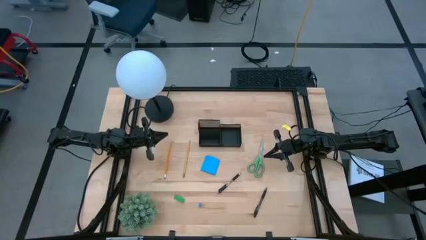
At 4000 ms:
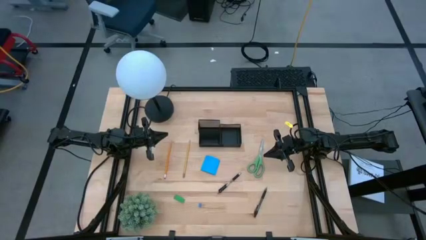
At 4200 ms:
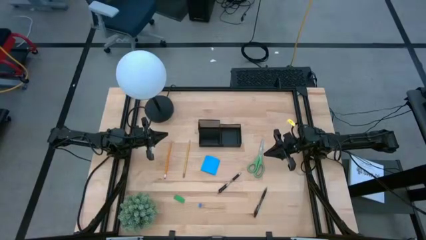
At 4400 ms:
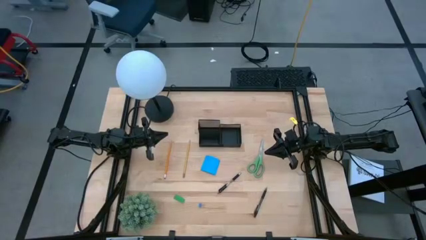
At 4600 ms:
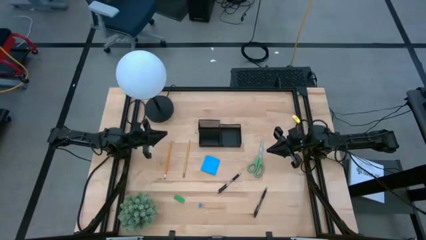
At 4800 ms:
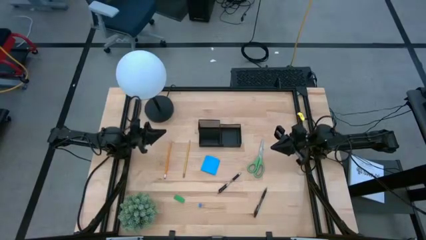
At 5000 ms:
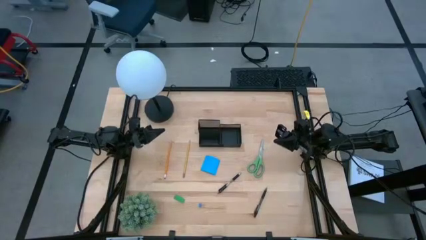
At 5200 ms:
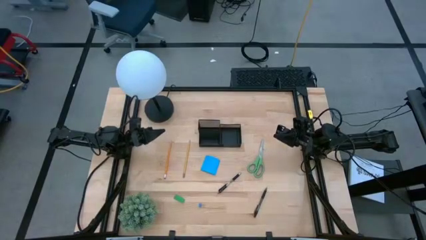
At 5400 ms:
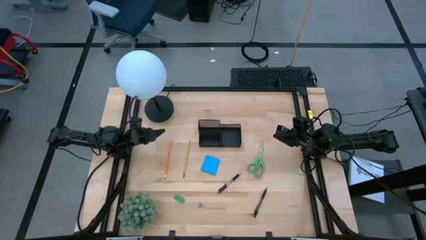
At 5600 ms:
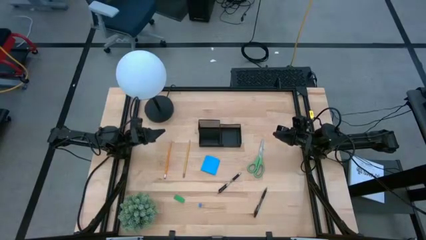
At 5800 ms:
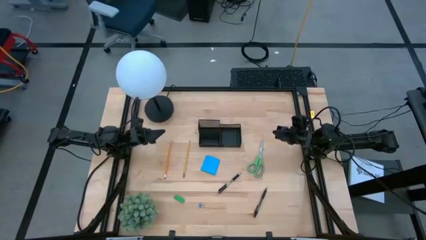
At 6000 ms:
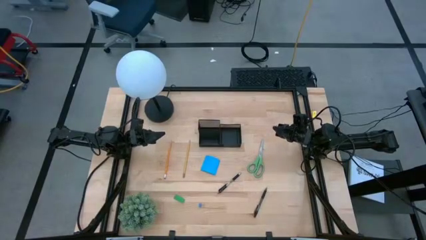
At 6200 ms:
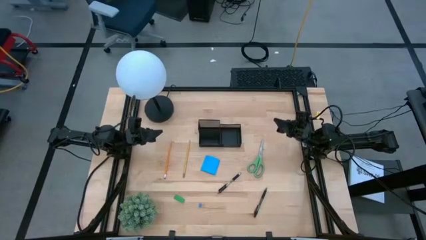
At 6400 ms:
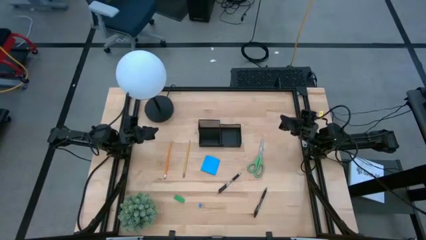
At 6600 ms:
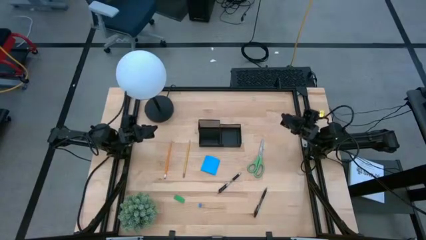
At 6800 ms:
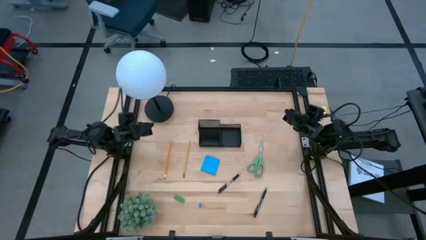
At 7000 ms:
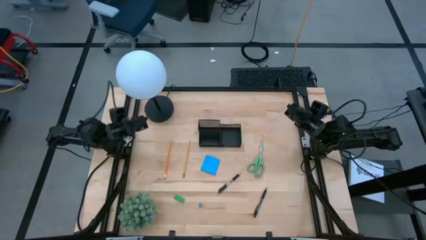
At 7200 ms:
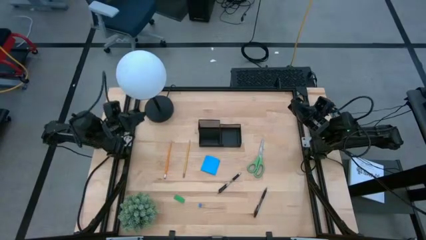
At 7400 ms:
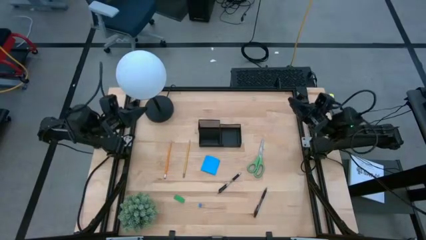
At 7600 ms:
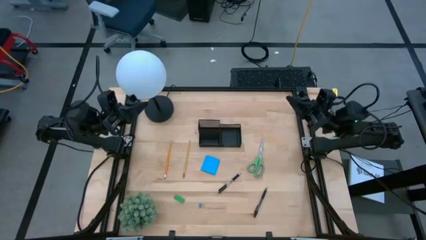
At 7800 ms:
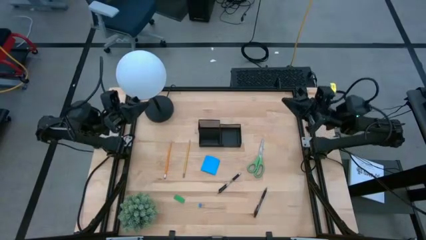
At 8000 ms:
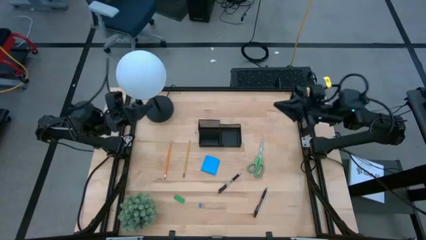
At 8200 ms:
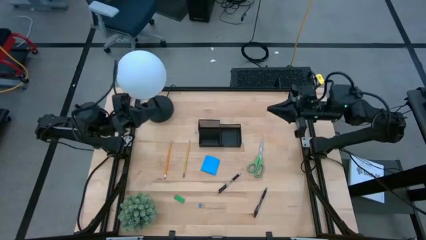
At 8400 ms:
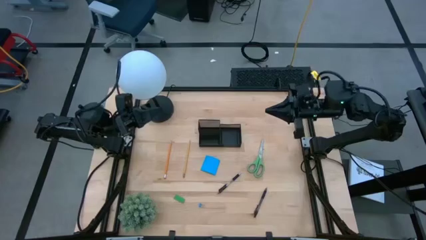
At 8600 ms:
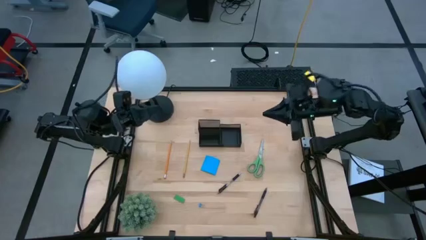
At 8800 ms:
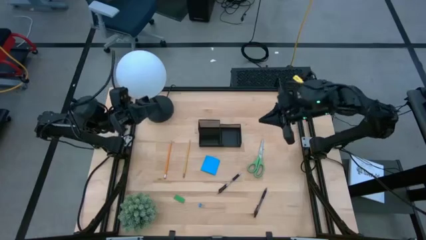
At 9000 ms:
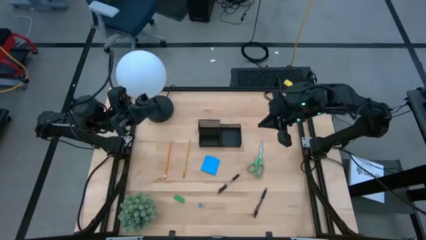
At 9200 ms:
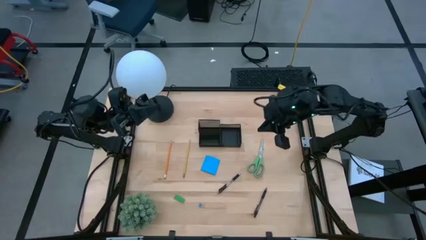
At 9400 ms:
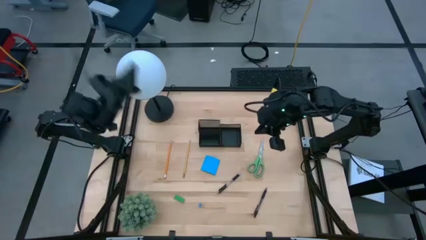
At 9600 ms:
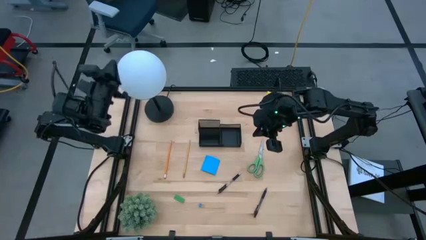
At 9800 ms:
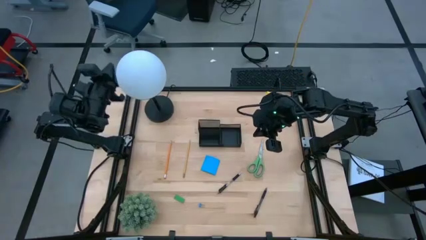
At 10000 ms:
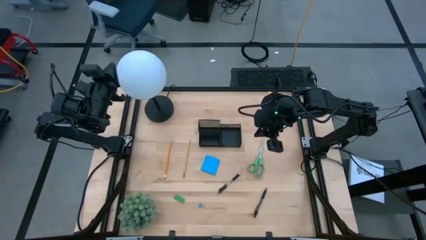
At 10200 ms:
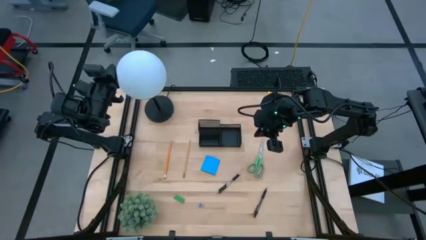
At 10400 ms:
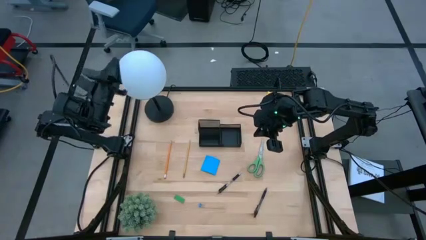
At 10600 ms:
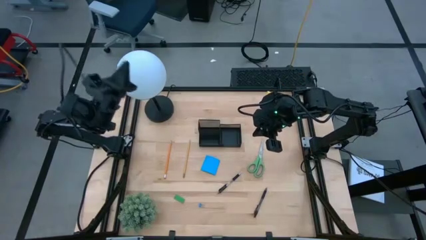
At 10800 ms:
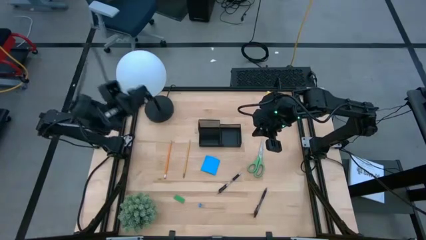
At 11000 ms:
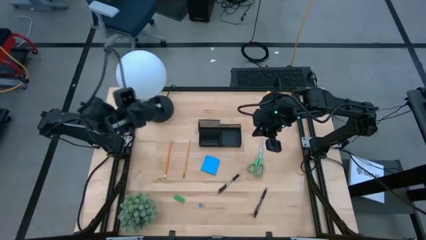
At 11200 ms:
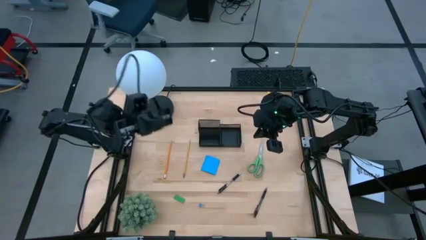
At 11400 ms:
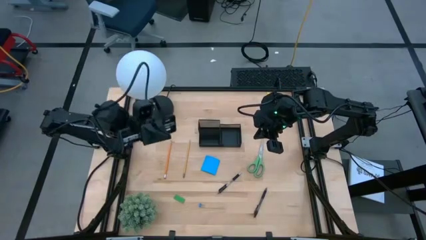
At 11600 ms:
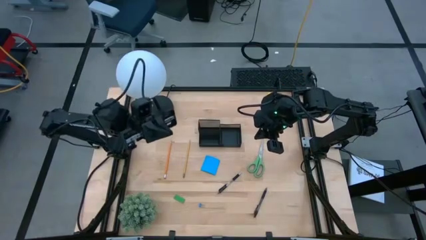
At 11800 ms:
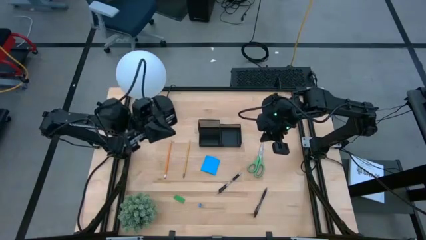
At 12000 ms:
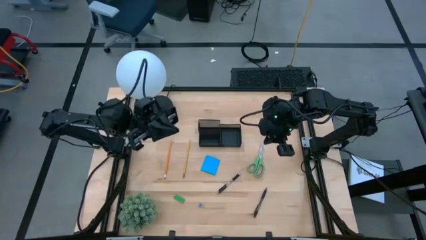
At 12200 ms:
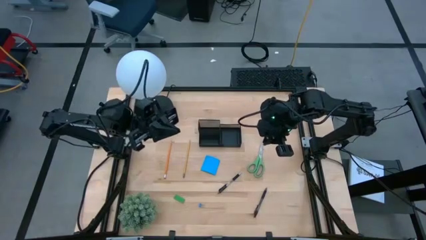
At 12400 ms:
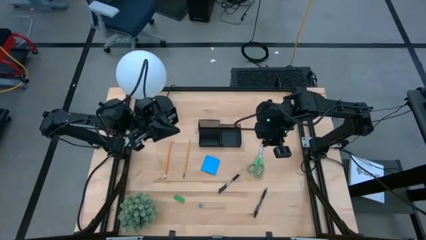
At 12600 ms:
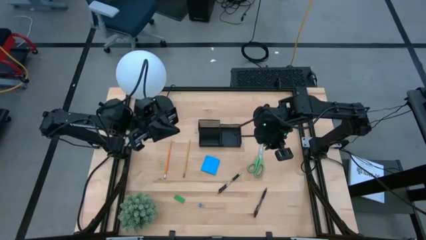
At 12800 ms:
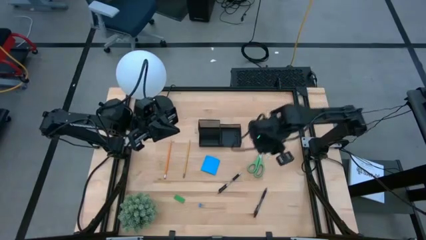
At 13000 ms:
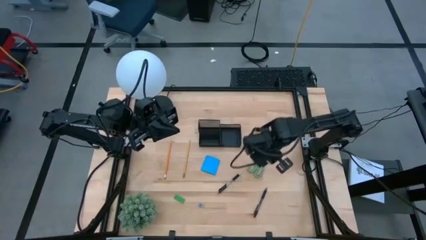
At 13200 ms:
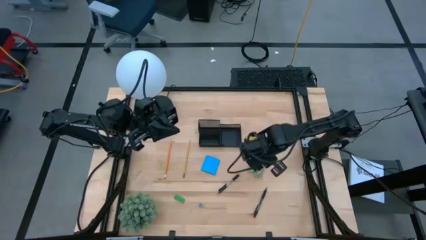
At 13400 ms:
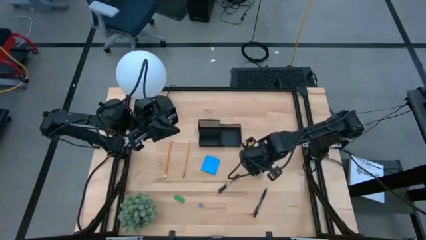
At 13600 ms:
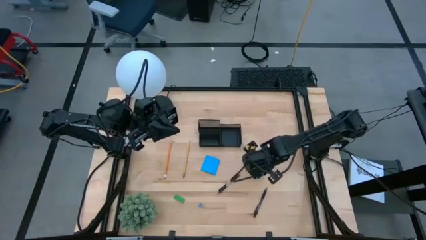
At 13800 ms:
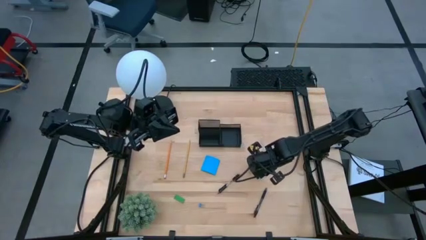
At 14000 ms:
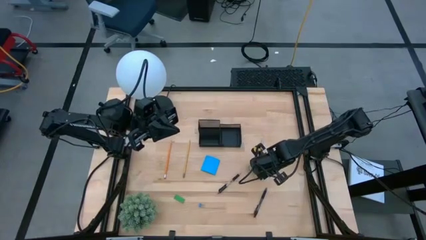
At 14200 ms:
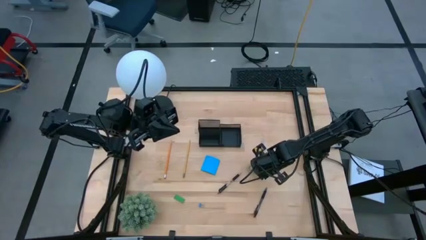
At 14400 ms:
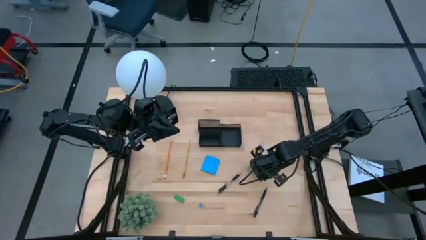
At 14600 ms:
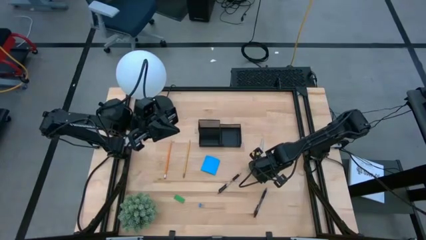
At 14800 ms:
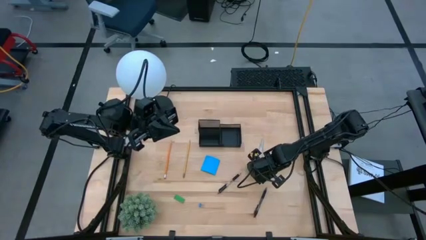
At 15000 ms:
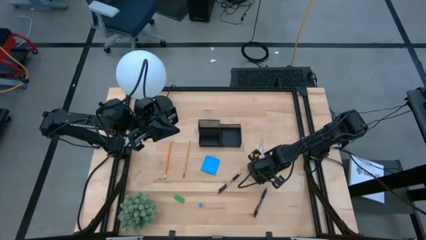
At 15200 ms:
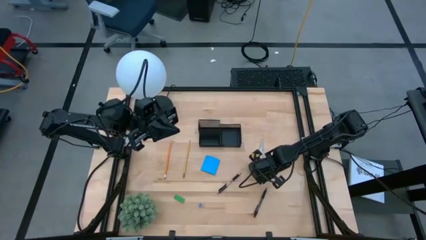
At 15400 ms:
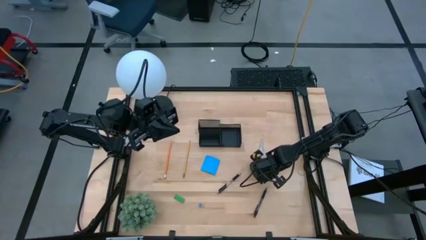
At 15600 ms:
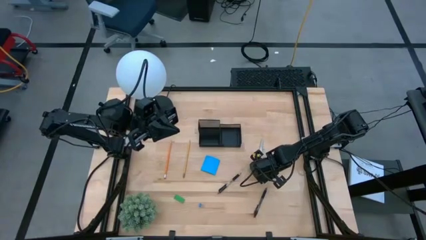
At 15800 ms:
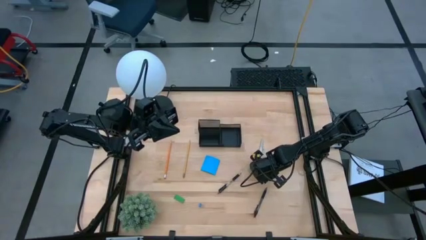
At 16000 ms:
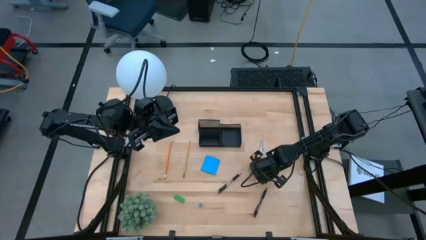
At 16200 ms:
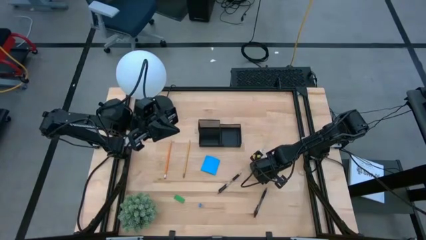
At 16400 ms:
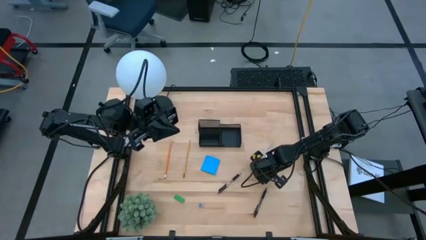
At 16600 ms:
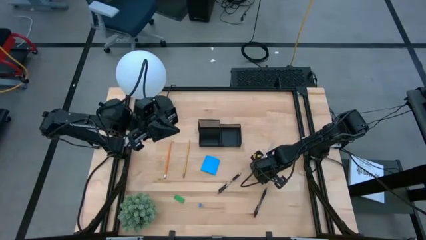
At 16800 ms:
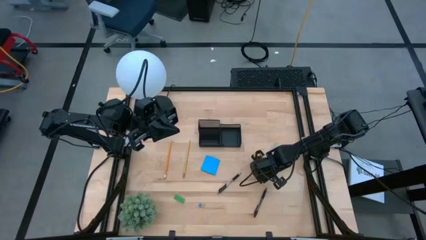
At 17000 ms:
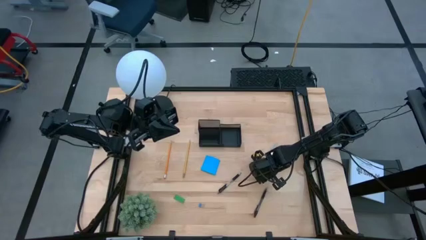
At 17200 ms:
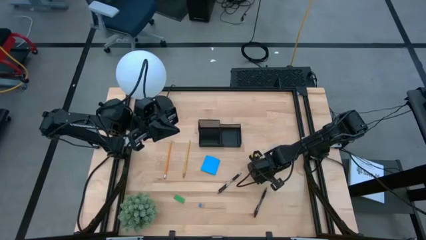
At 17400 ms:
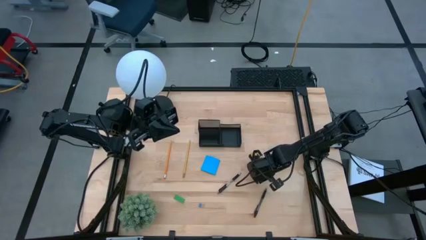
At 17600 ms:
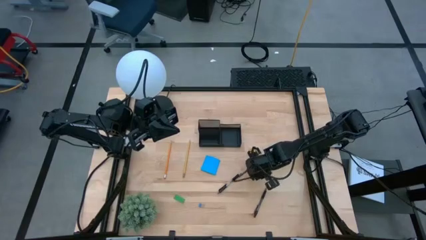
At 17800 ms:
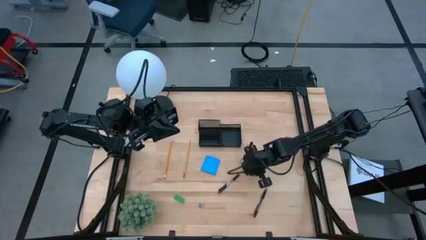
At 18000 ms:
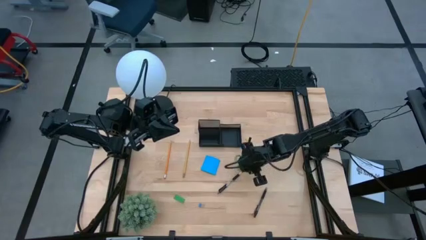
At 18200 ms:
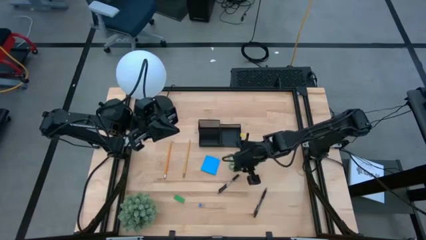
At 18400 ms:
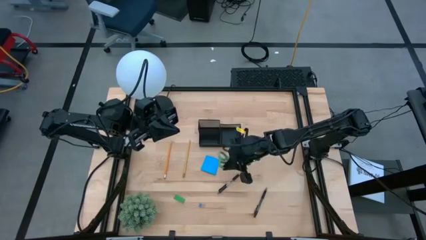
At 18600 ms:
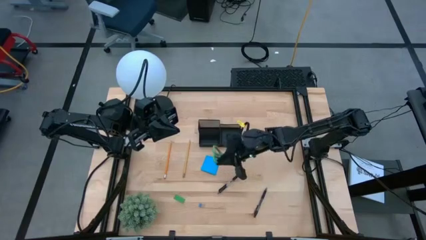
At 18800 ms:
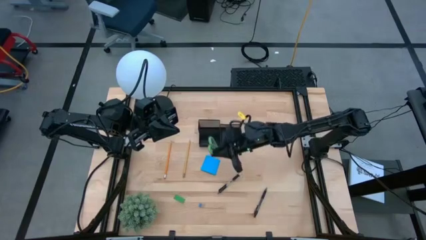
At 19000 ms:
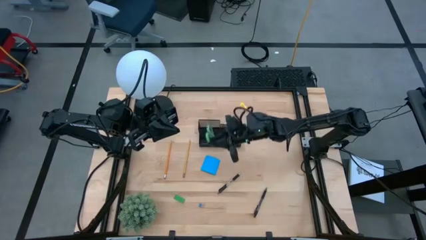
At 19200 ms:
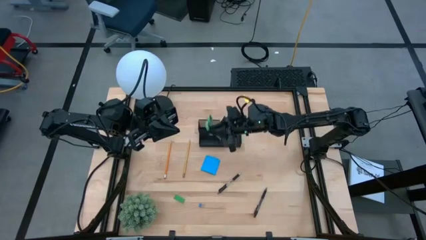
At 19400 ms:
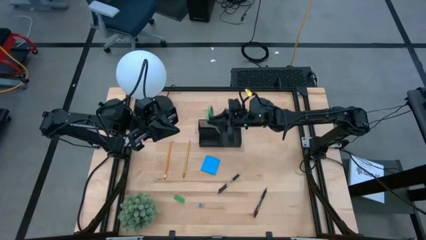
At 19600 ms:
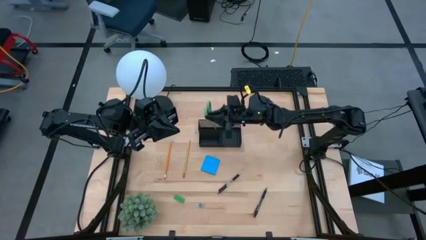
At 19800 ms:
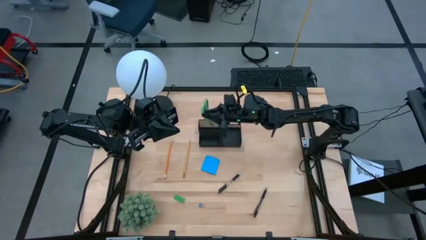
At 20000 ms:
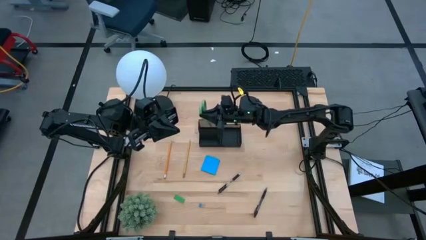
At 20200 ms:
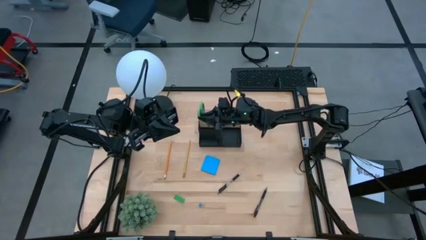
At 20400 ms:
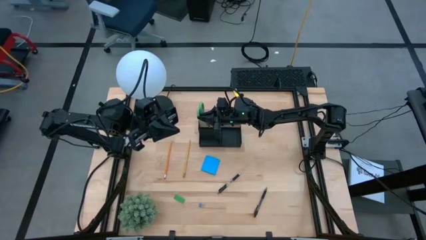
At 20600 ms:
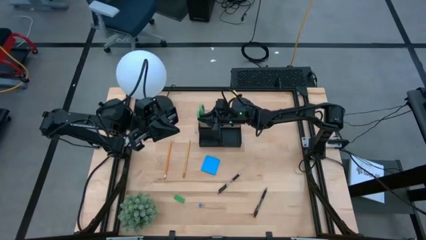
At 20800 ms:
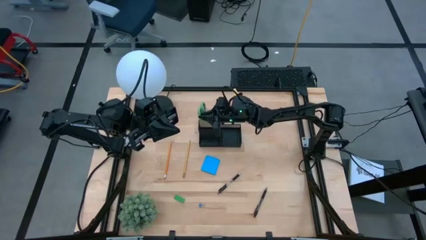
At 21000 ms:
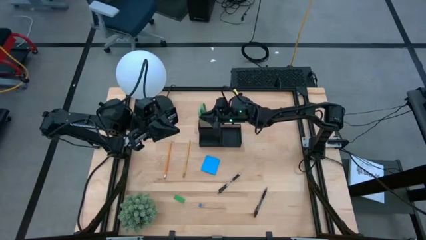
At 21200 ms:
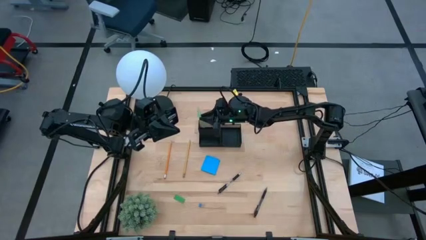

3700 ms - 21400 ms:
Task: Pick and place office supplies into organizer
Put the green scissors into the black desk organizer
